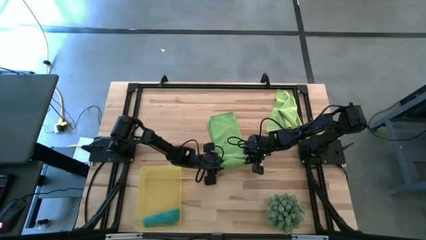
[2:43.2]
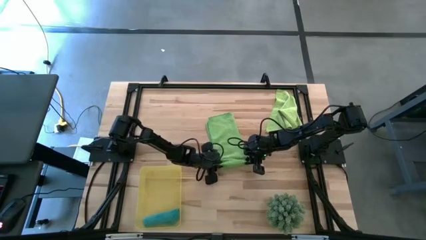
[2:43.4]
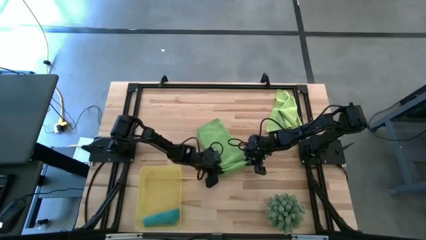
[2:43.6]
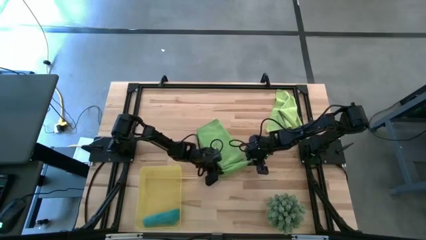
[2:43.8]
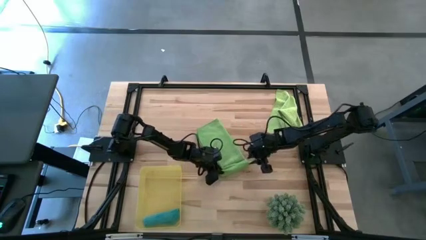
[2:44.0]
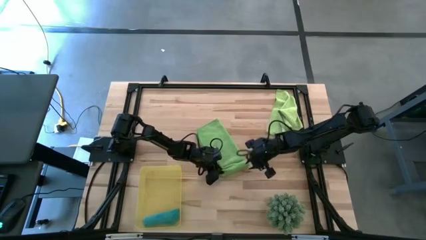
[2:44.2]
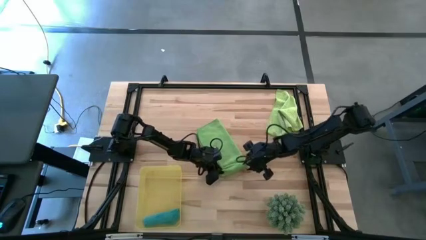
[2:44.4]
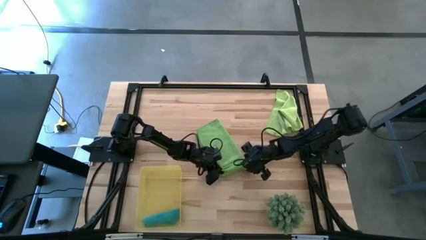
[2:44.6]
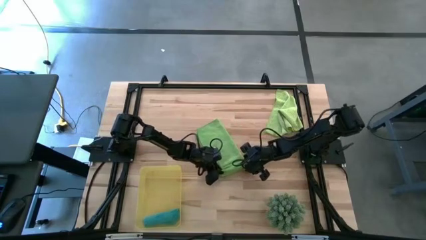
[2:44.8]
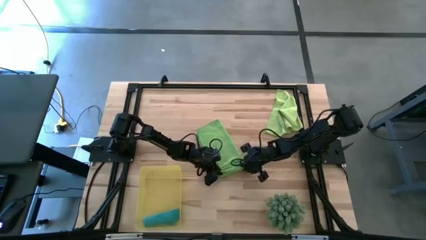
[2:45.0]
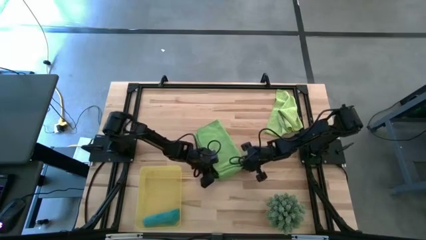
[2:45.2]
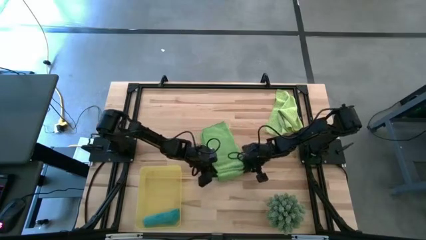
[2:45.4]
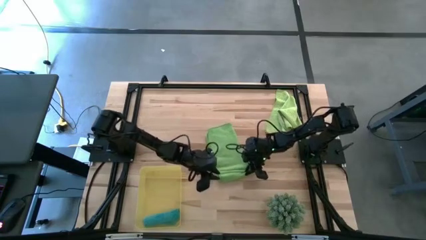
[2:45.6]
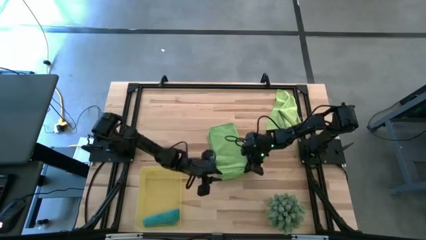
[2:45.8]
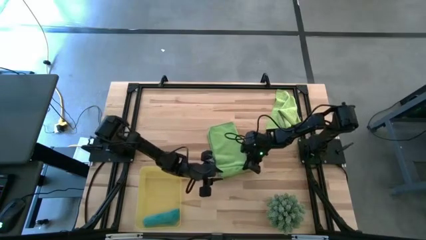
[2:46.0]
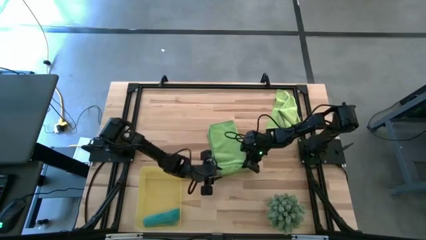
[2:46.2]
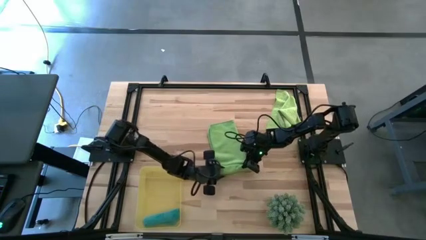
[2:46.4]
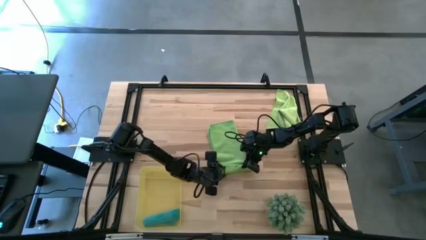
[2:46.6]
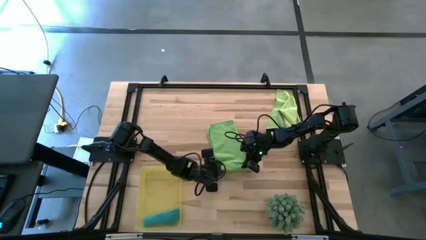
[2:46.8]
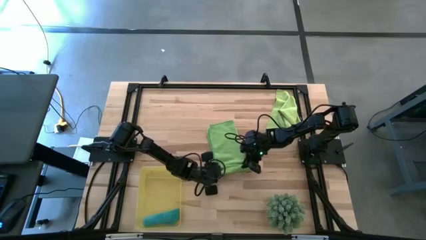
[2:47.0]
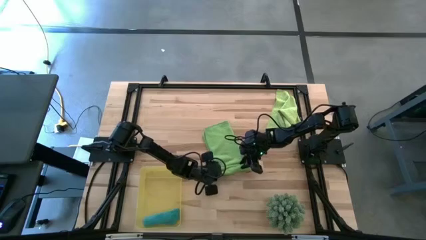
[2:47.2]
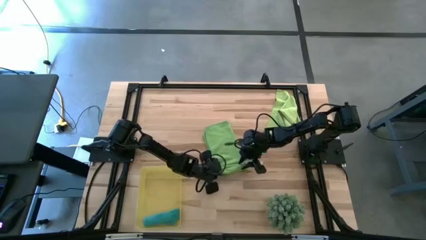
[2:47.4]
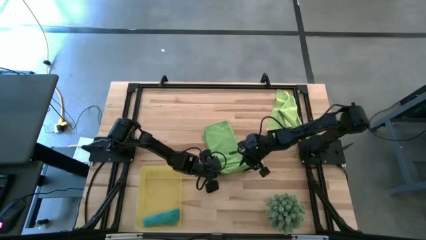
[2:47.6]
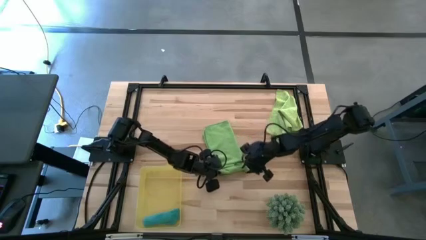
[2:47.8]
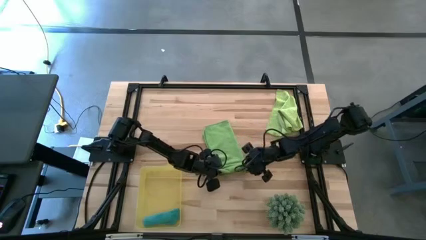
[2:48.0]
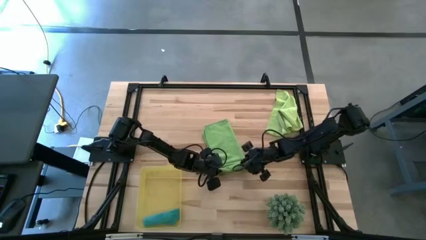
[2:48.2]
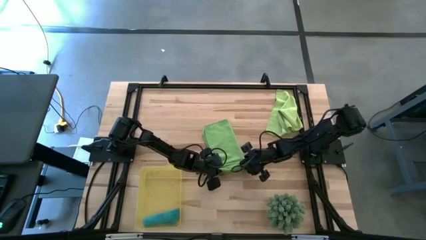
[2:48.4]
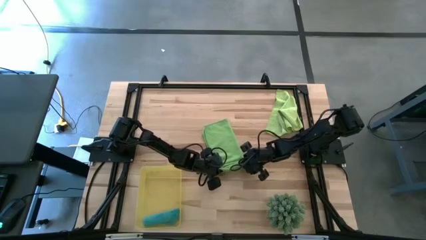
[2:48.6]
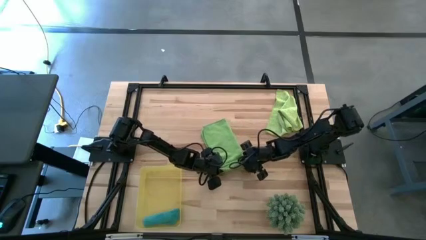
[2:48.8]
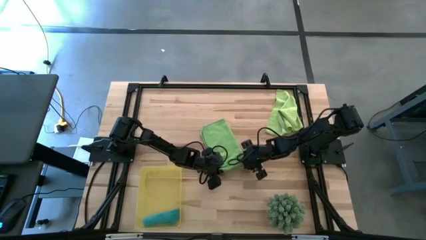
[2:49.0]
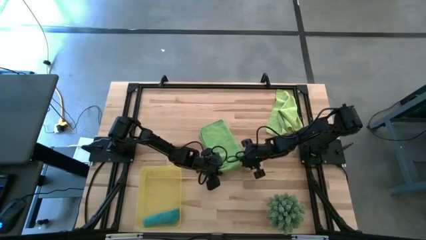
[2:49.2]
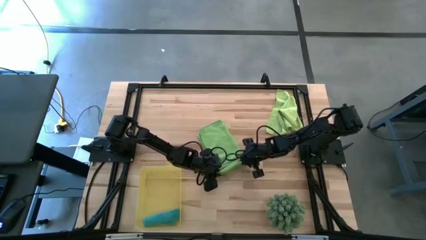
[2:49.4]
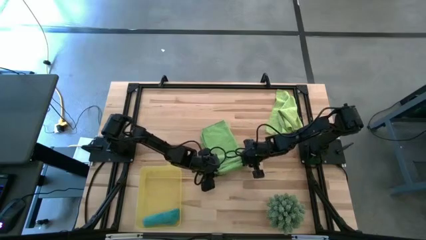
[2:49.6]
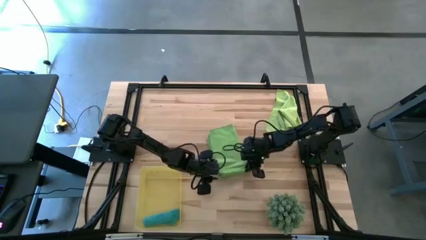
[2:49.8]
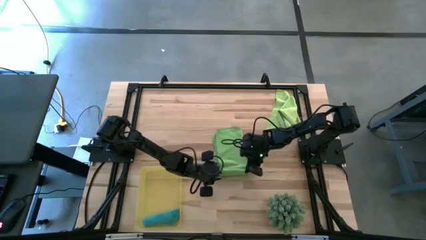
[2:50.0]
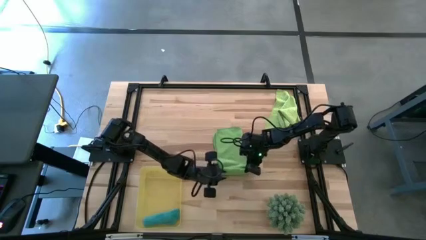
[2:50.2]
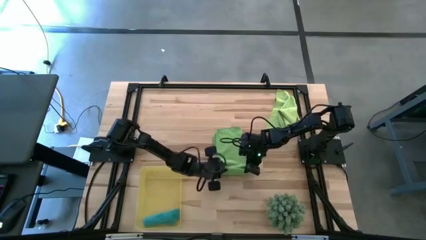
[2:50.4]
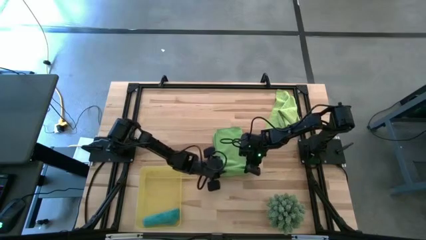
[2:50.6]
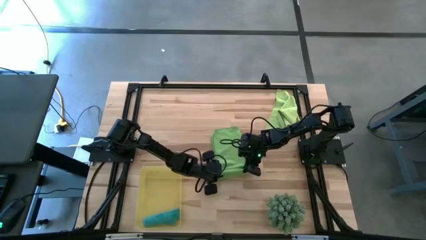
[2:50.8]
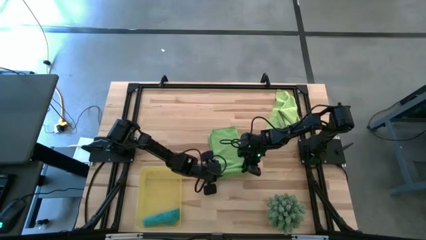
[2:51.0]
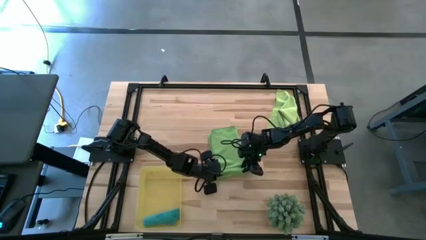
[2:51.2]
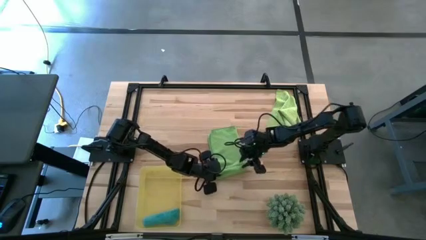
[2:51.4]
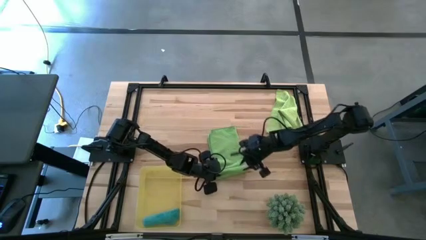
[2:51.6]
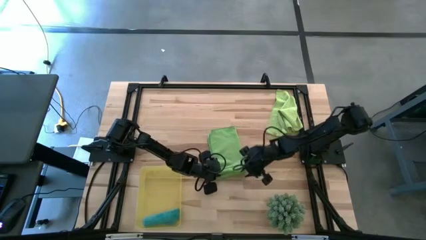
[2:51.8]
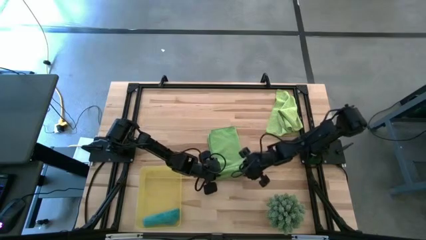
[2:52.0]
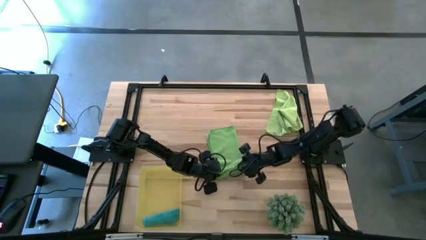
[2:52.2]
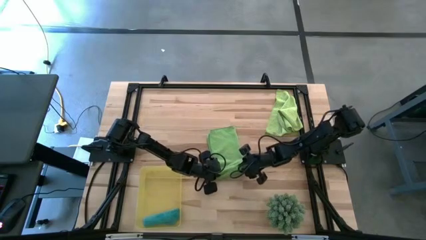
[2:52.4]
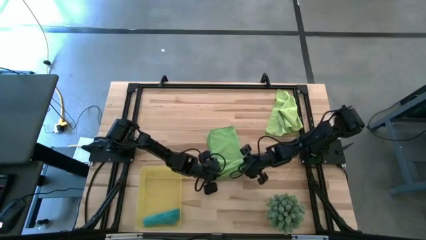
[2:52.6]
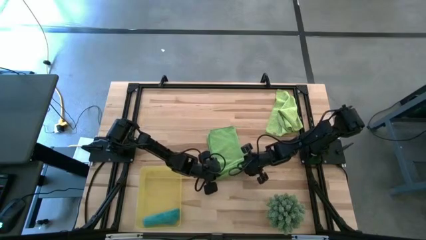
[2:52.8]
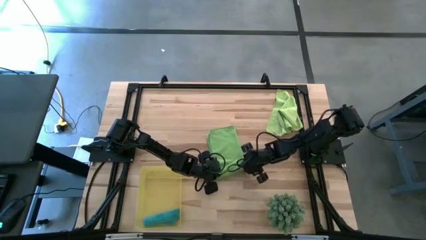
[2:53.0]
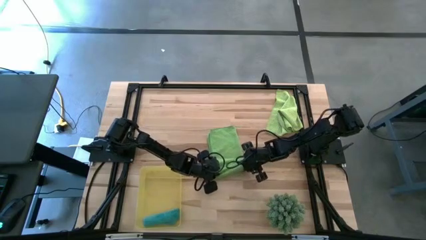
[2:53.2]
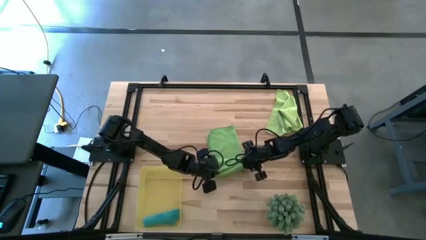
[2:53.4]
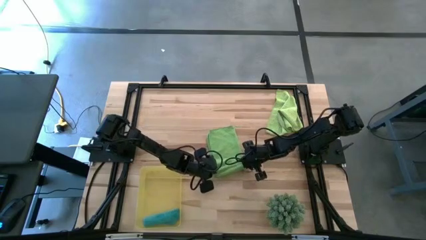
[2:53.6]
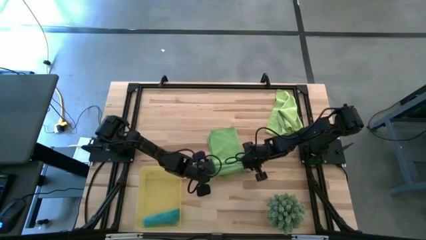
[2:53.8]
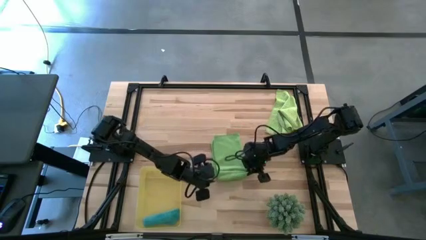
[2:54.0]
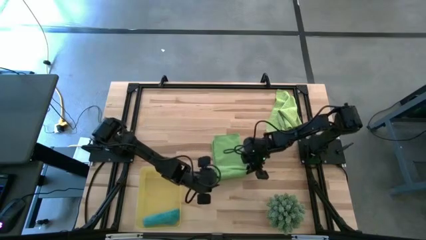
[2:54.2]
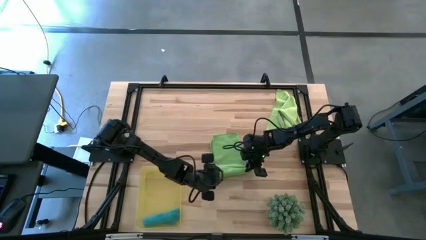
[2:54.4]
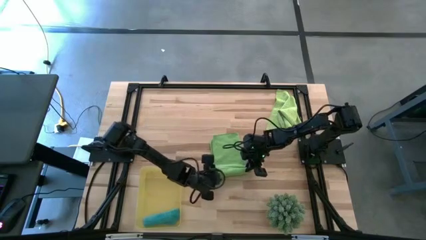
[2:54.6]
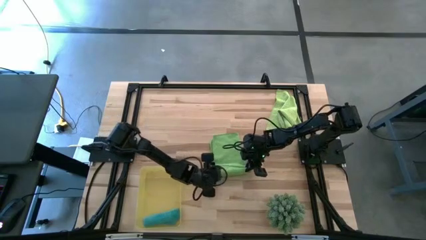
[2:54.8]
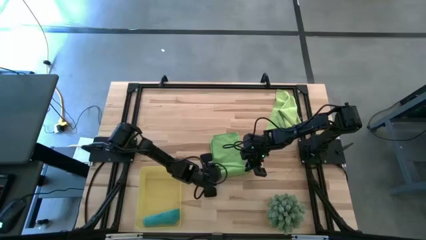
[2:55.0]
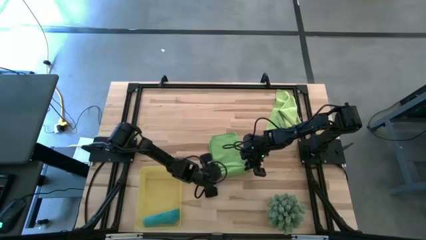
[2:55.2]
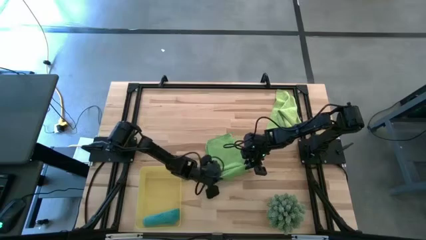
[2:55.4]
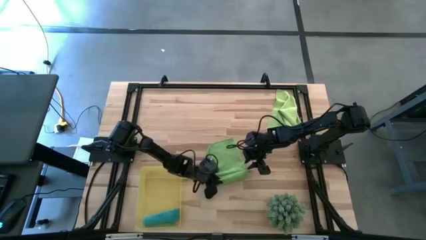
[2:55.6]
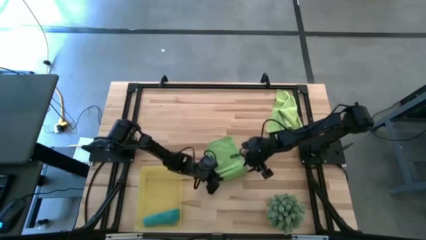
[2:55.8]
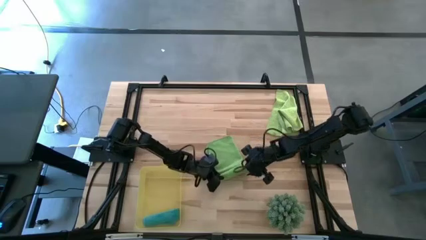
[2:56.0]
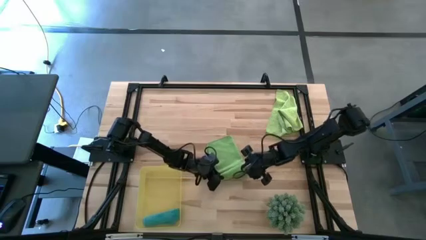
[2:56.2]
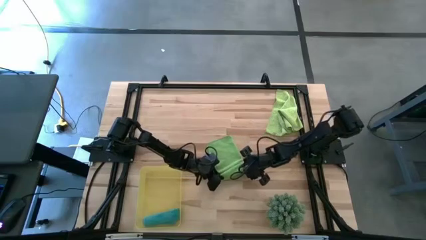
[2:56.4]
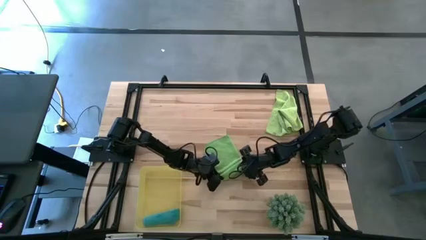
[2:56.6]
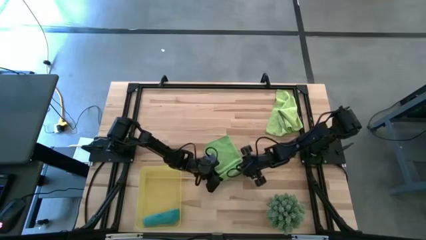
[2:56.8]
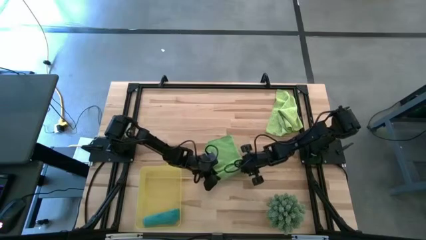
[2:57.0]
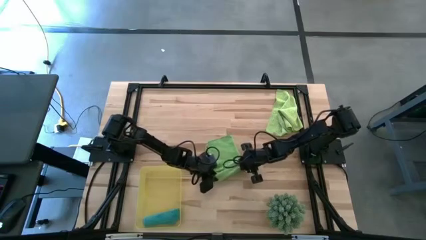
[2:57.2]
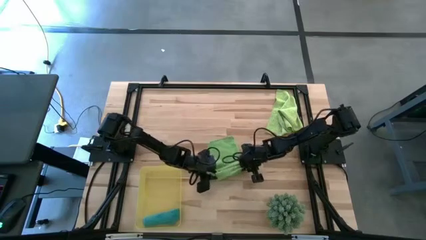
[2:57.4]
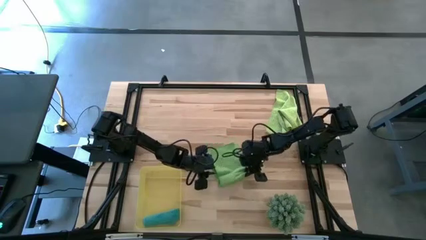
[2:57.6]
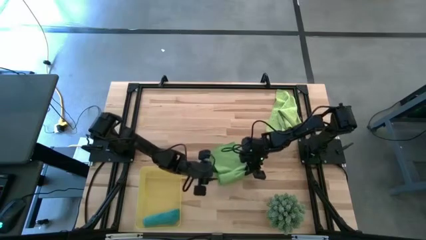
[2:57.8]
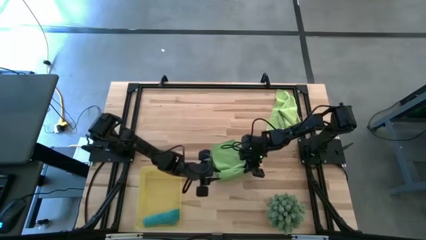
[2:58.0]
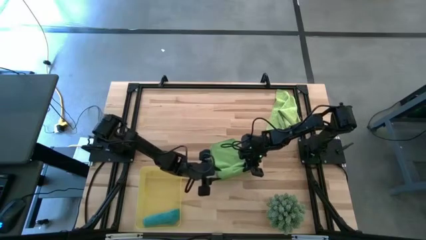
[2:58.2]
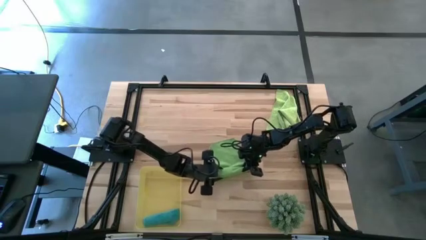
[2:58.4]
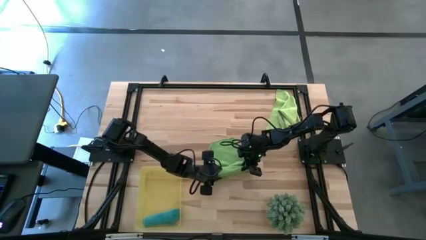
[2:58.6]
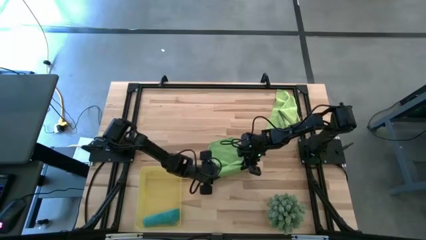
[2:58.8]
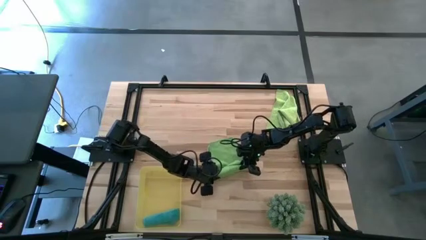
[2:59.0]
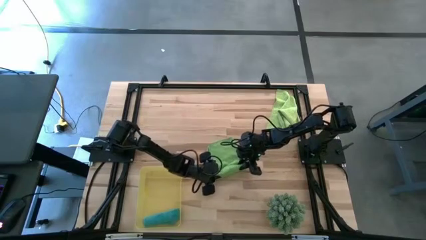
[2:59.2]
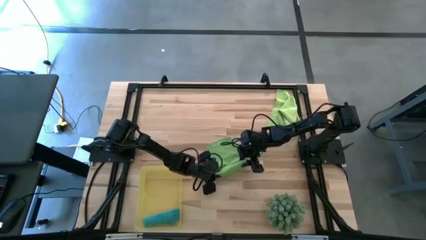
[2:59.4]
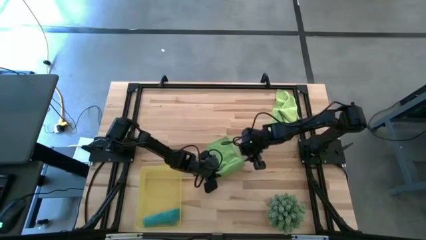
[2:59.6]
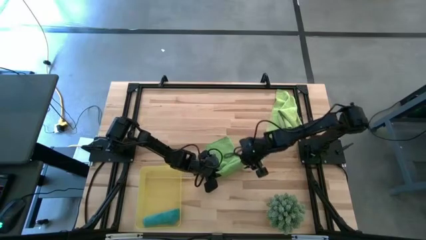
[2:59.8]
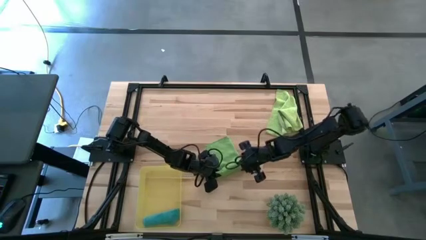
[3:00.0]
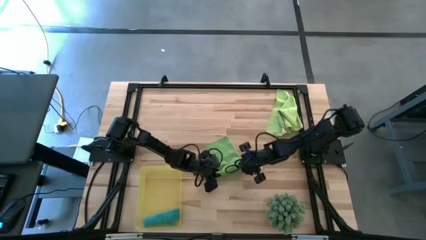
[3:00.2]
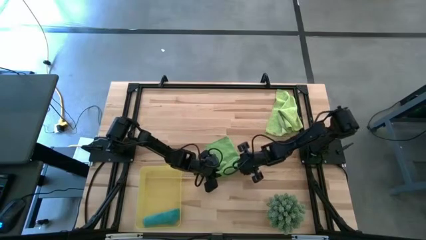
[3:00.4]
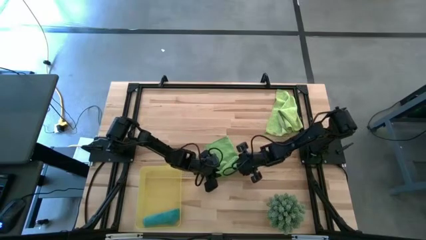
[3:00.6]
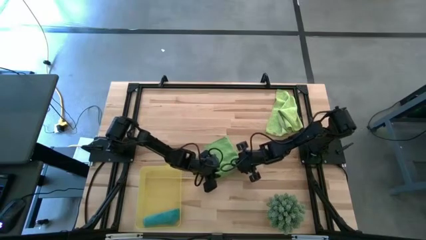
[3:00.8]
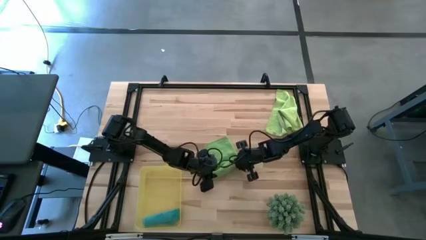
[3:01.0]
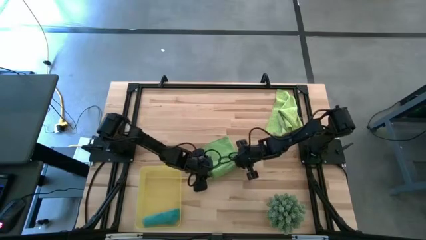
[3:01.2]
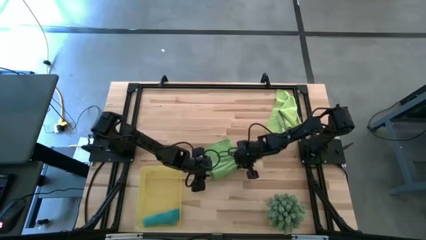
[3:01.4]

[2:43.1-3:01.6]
Task: Roll microfiber towels into tight, uniform cylinder then place into a basket
Roll the green microfiber towel
